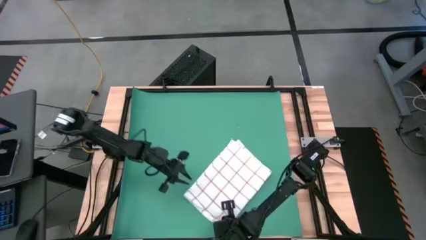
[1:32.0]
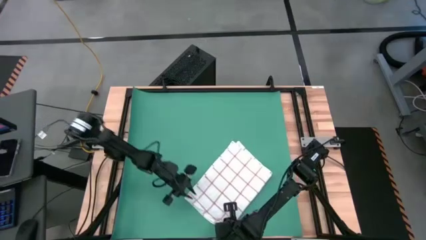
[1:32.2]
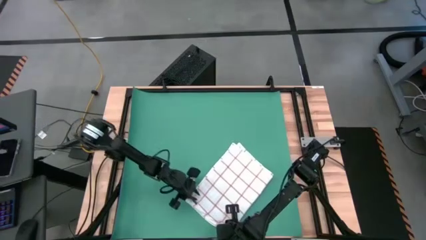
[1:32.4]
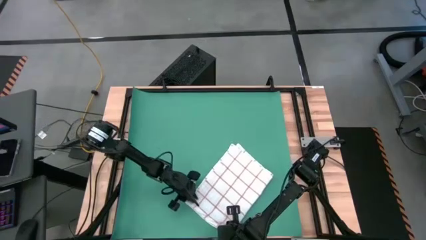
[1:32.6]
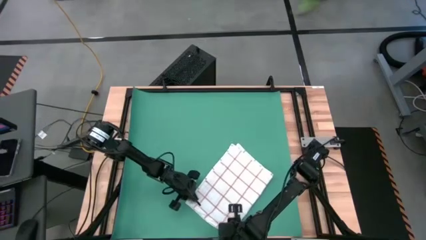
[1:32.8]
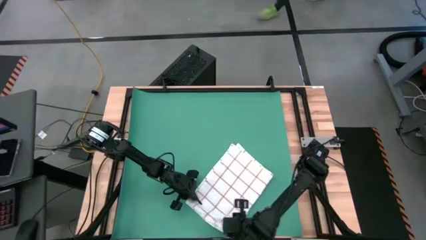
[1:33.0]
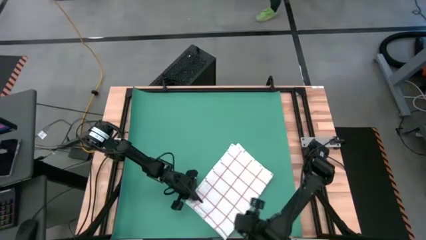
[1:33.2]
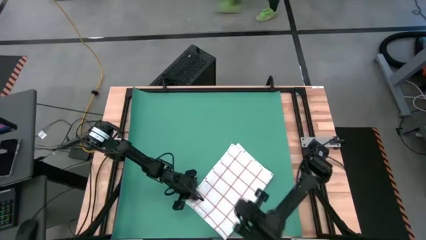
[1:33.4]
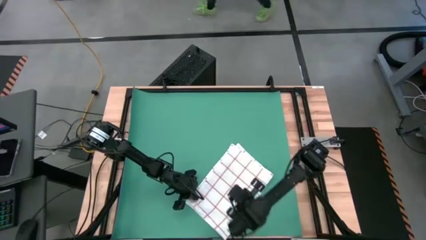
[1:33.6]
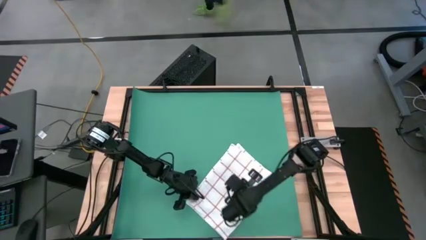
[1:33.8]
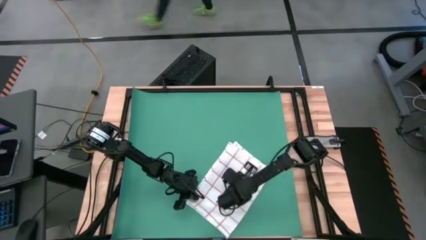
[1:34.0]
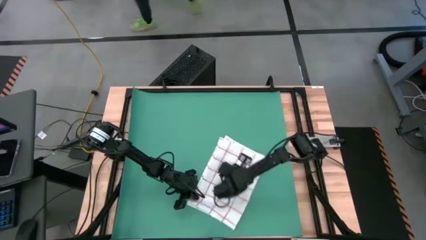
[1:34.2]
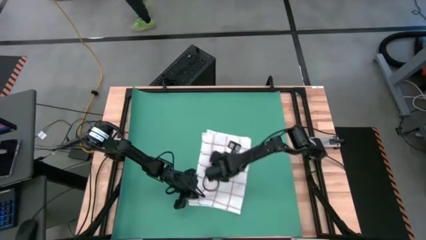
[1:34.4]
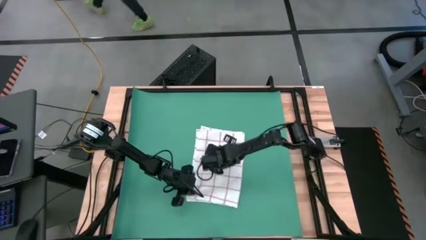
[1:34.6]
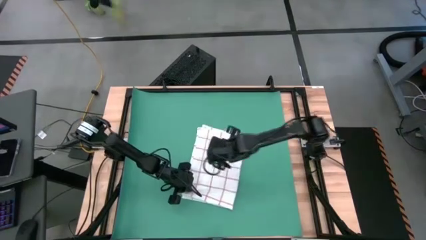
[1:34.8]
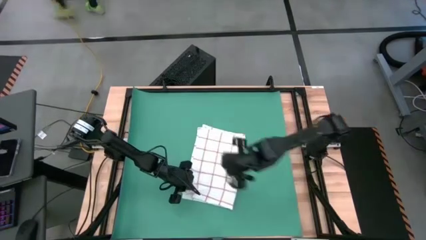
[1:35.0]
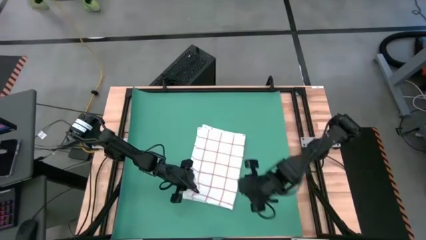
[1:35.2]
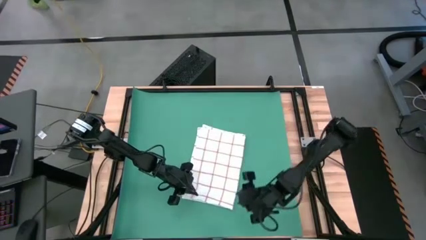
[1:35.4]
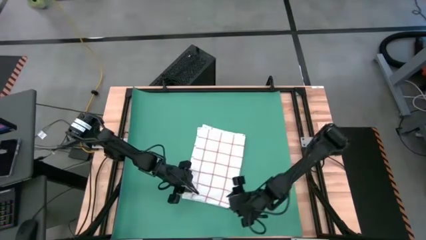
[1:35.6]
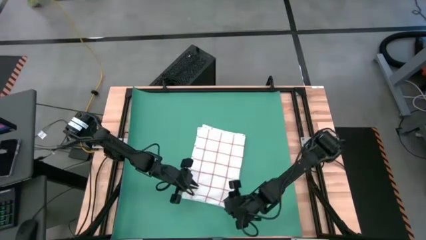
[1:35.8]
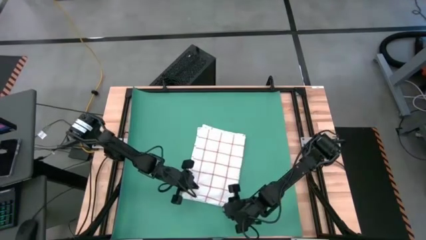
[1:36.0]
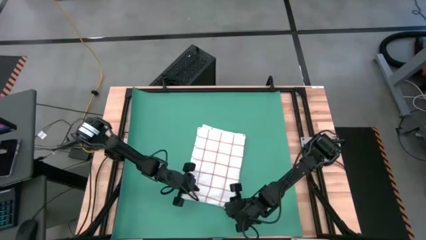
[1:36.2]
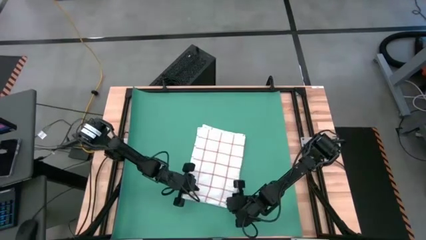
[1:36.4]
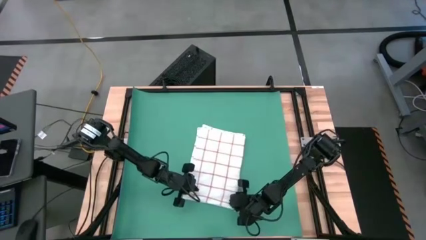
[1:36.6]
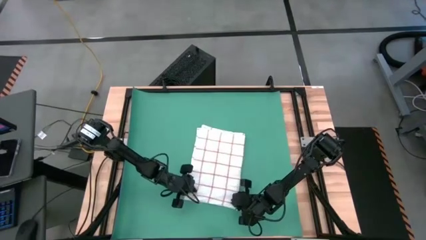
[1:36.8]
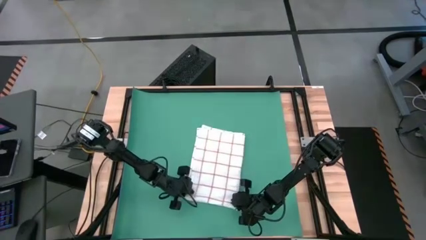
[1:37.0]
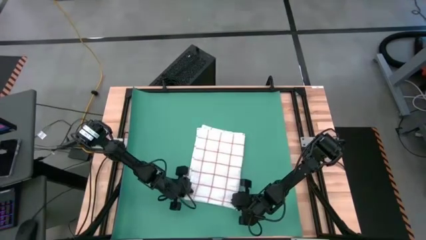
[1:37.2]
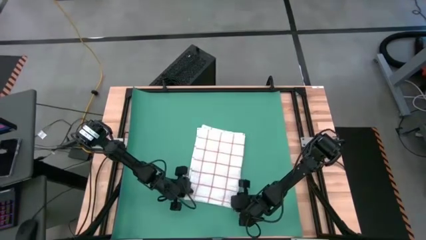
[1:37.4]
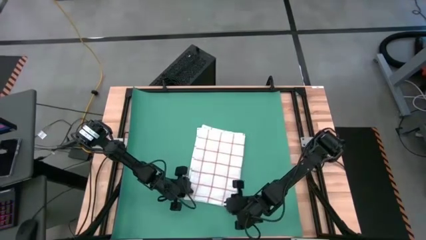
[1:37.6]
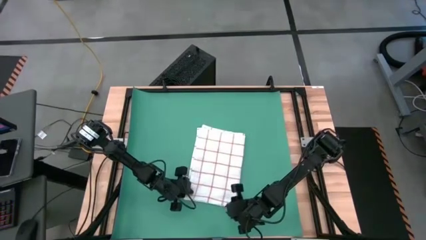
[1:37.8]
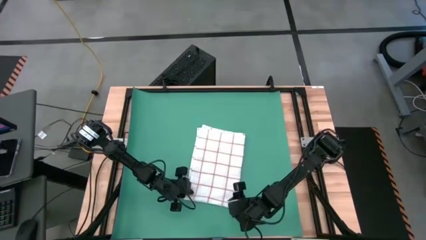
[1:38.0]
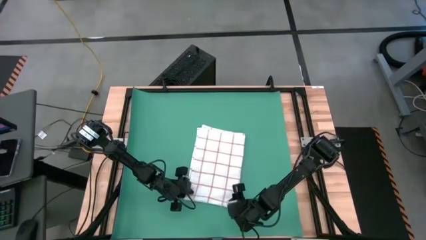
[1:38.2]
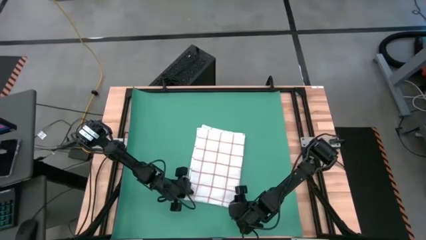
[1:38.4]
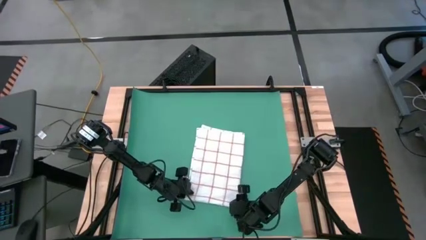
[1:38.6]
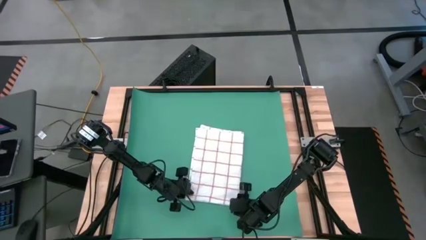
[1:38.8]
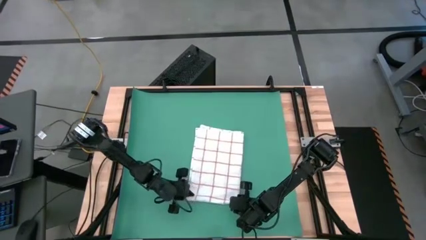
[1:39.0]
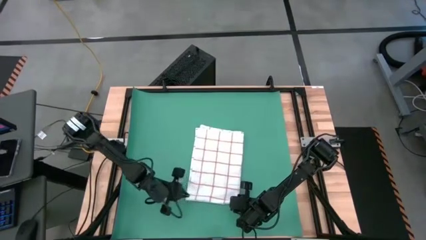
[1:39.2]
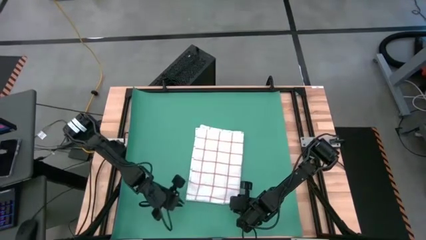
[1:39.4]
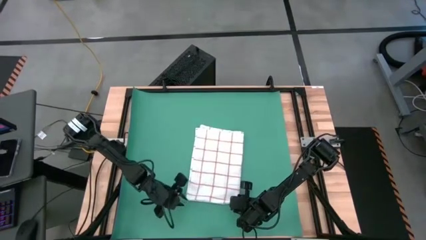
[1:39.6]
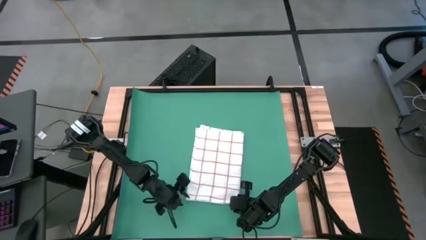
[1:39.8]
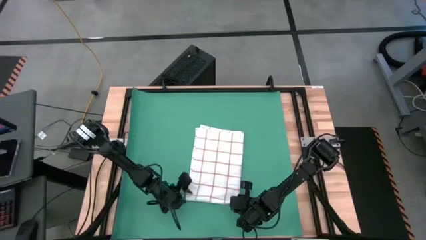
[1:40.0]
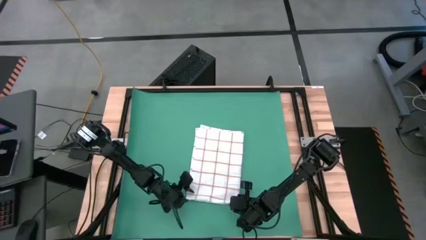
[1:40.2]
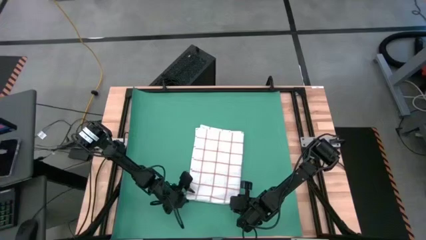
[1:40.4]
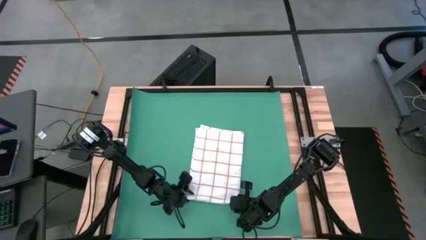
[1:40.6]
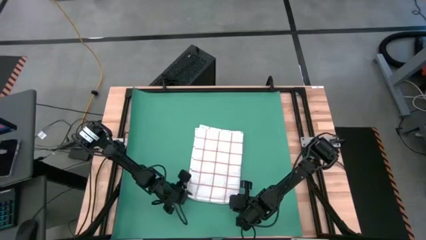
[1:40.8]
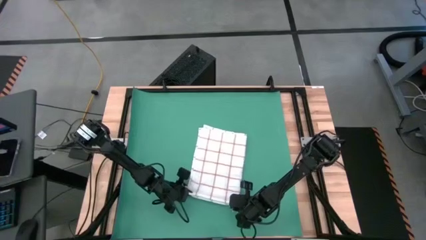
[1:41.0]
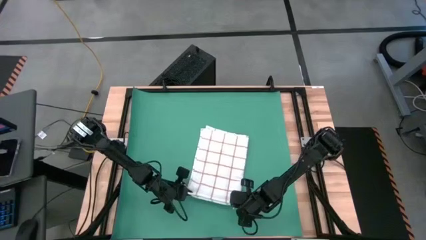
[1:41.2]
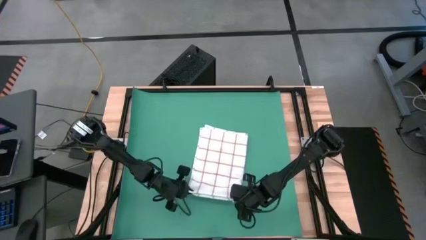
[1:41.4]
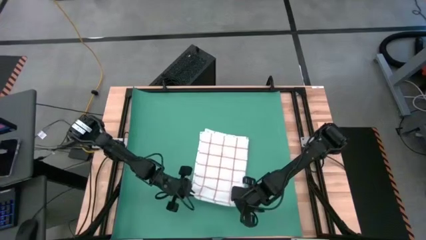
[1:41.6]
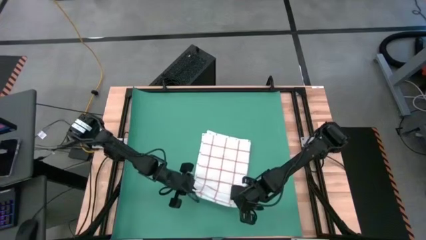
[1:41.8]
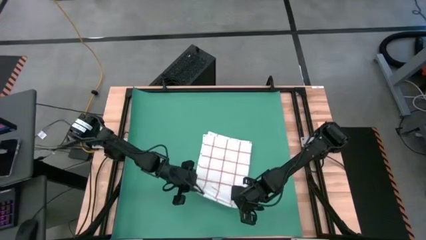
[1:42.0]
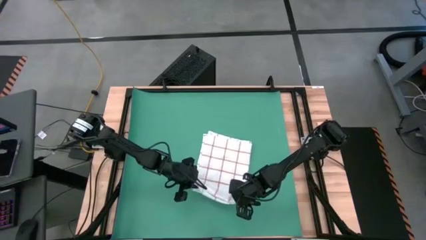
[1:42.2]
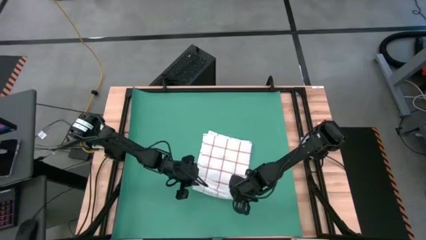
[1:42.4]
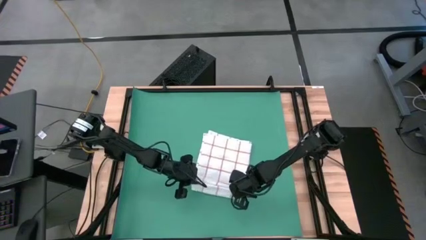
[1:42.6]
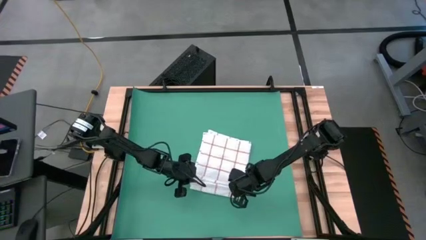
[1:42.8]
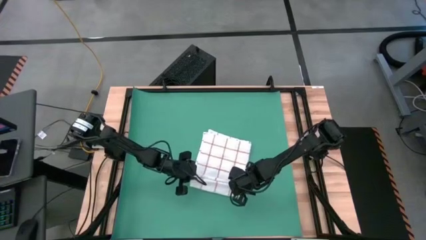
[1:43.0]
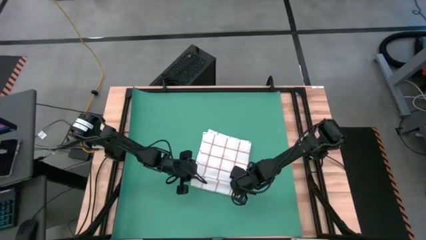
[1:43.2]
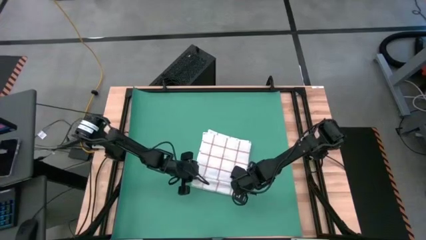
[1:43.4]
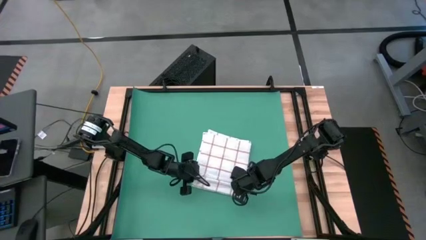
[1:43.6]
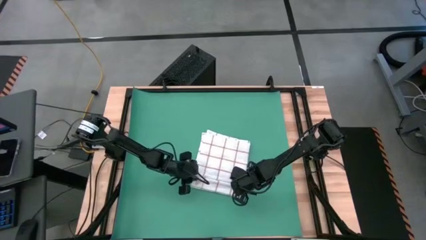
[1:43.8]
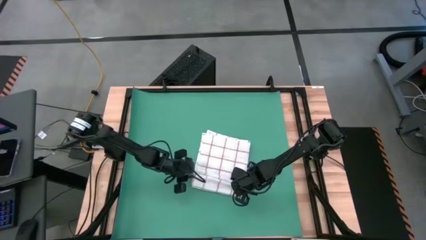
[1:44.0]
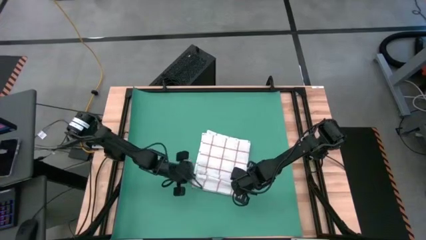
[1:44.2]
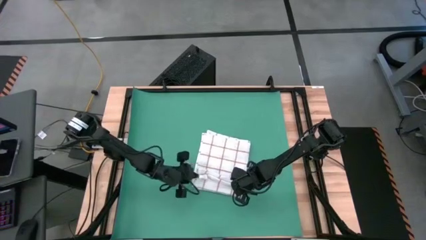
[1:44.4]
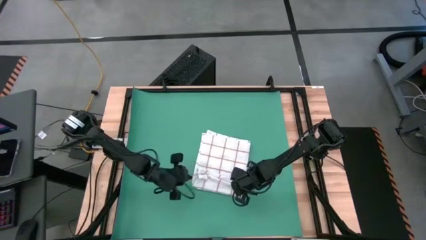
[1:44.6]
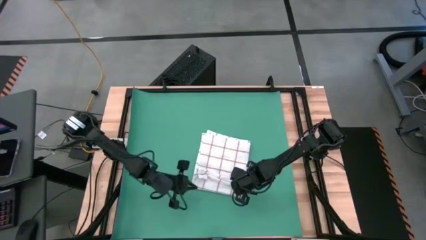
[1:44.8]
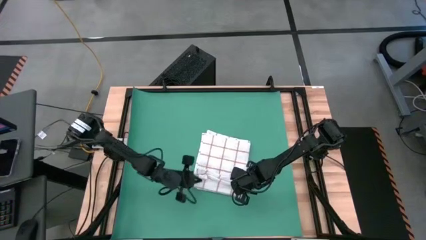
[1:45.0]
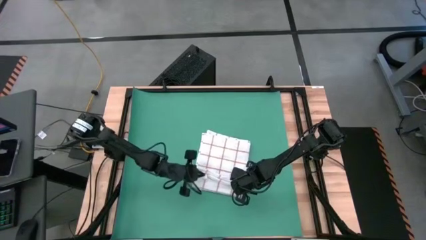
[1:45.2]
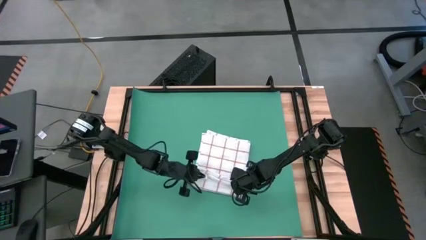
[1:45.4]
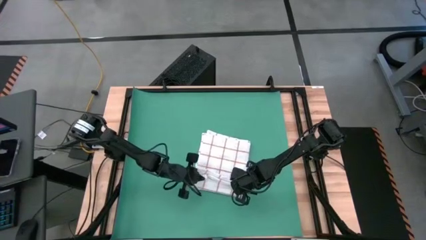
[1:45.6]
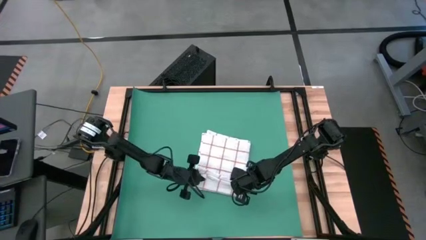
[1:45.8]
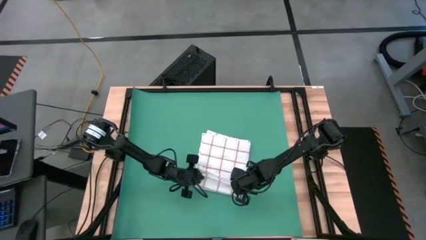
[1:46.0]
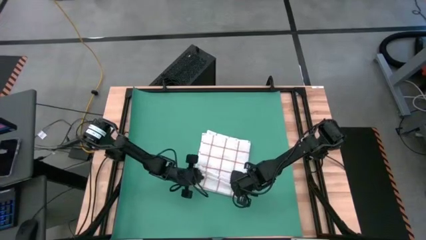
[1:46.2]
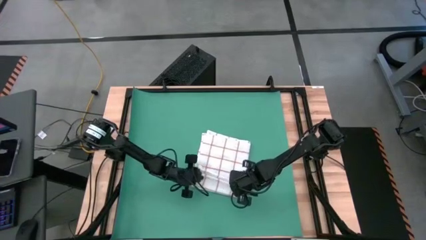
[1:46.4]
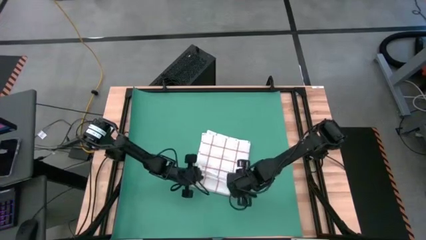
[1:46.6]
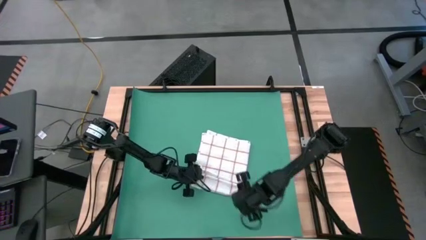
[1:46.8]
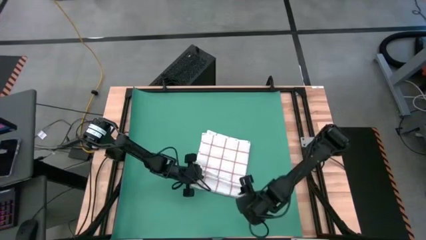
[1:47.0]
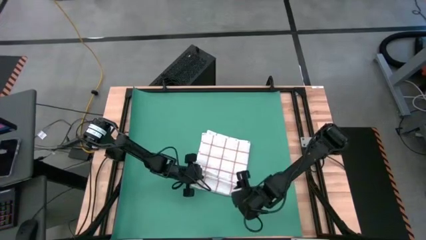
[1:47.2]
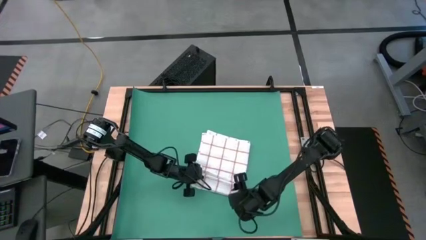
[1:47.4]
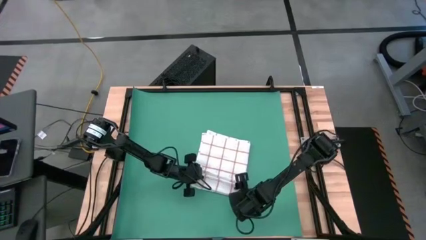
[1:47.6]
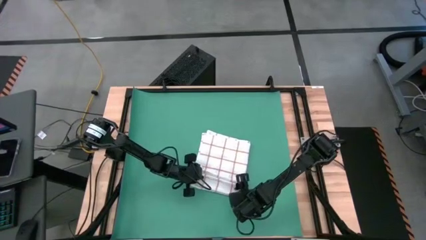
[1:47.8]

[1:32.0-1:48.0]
Task: Roll towel
Roll the white stripe towel
